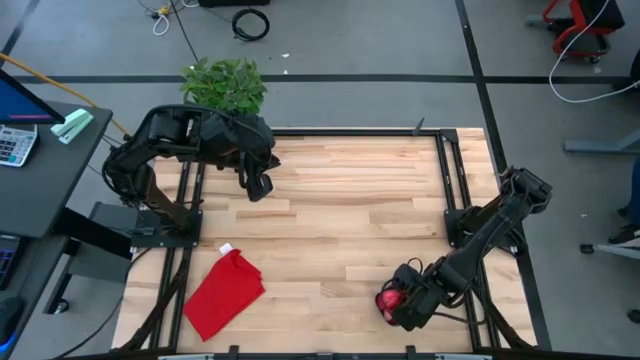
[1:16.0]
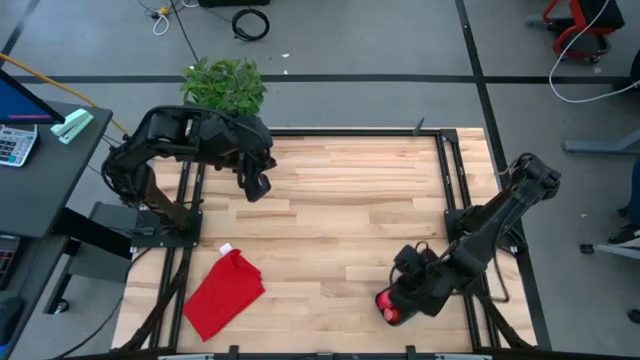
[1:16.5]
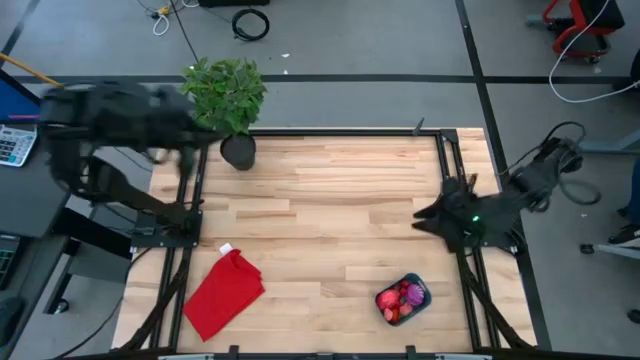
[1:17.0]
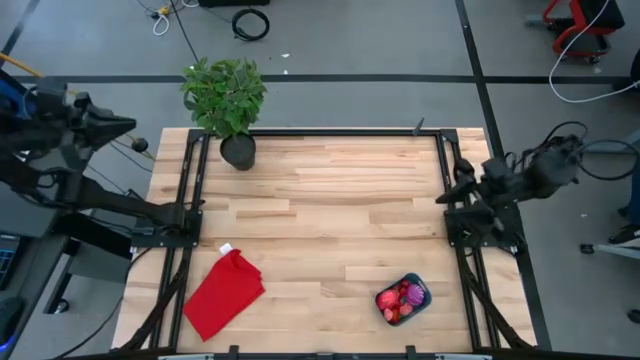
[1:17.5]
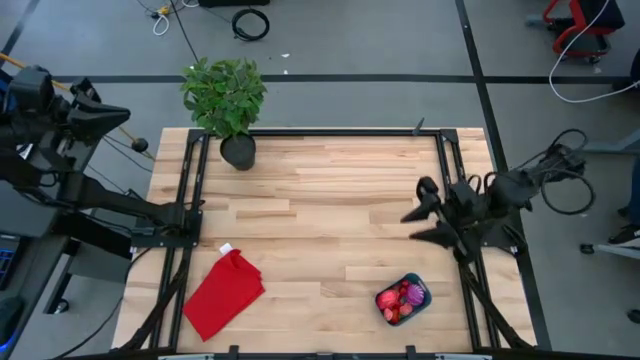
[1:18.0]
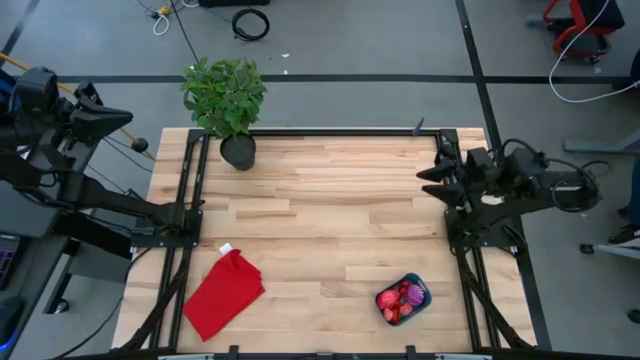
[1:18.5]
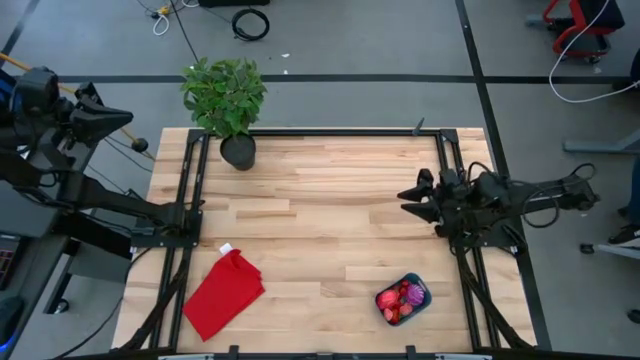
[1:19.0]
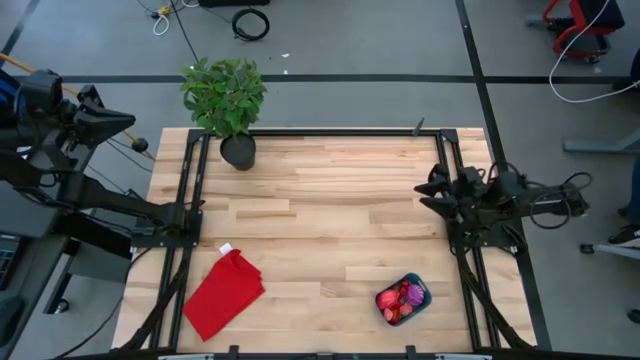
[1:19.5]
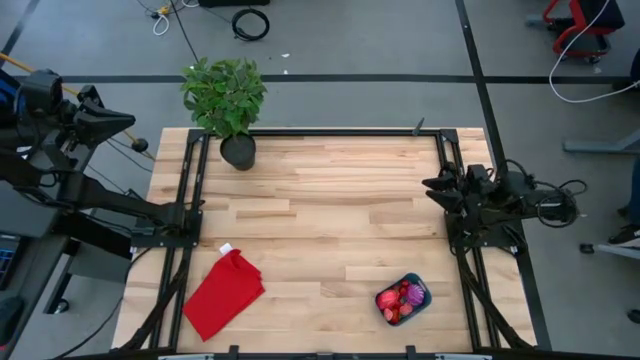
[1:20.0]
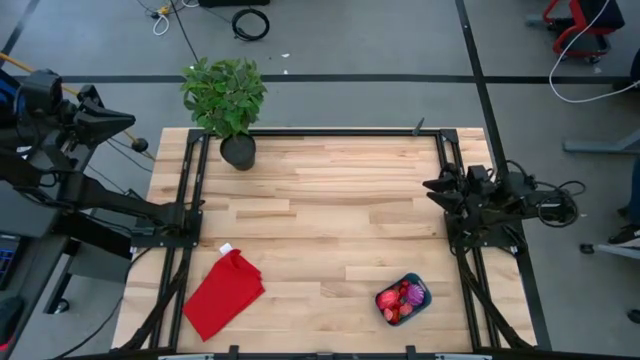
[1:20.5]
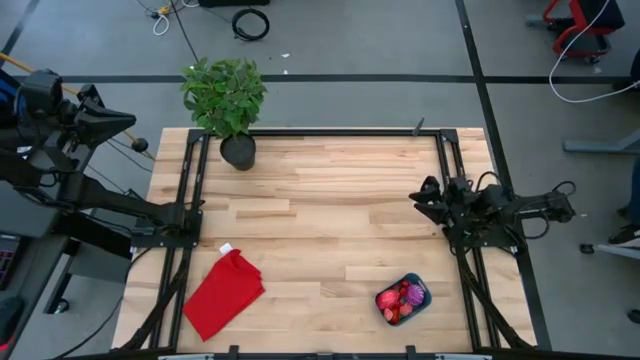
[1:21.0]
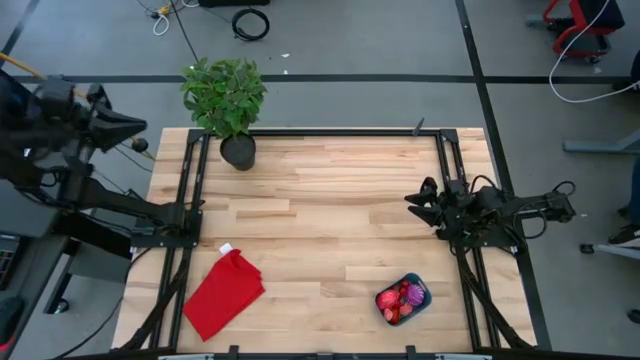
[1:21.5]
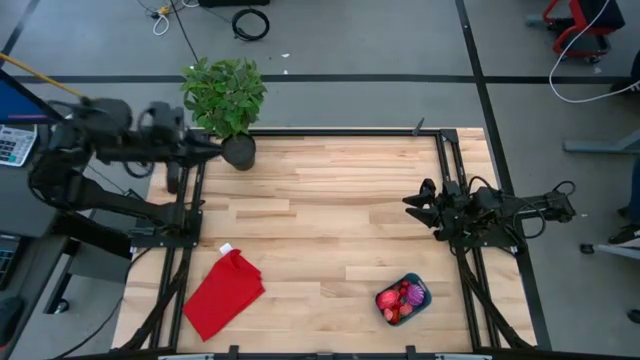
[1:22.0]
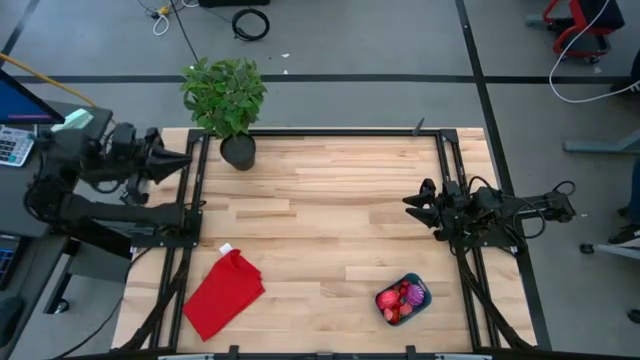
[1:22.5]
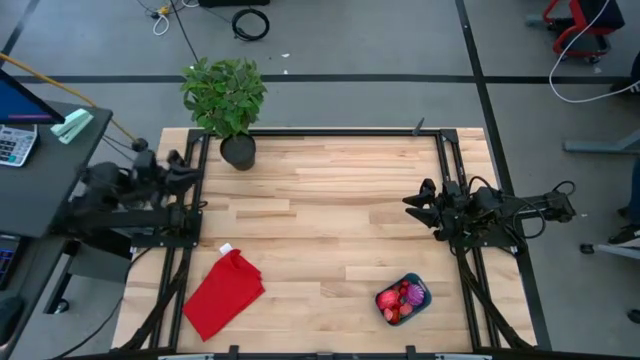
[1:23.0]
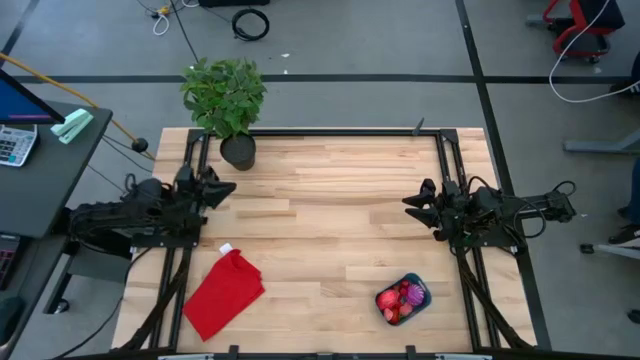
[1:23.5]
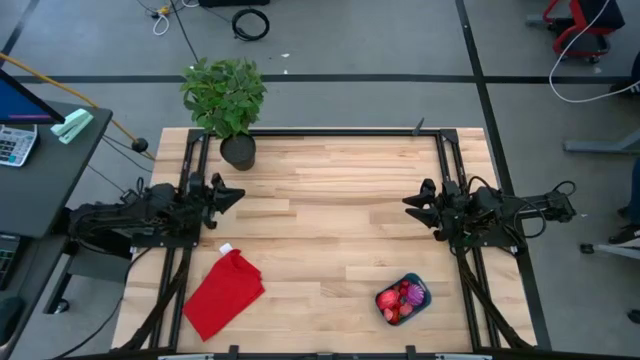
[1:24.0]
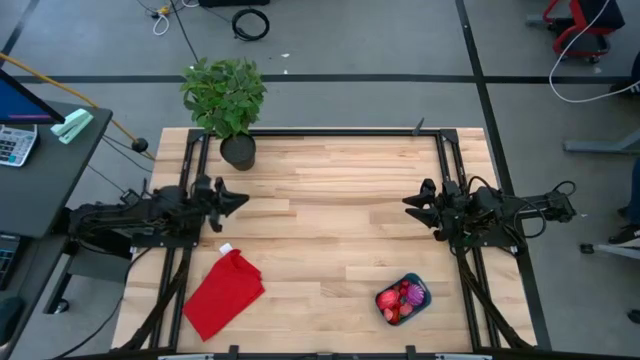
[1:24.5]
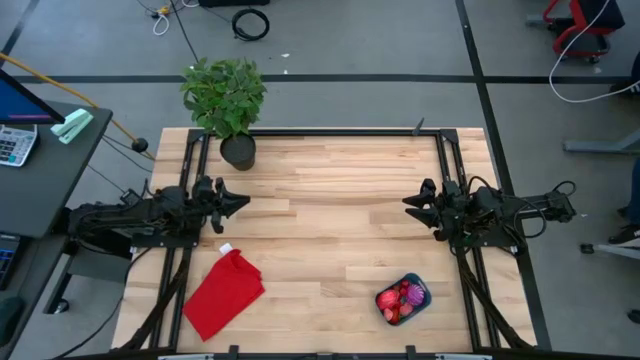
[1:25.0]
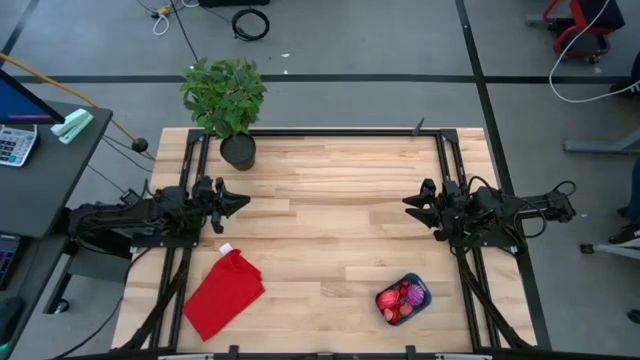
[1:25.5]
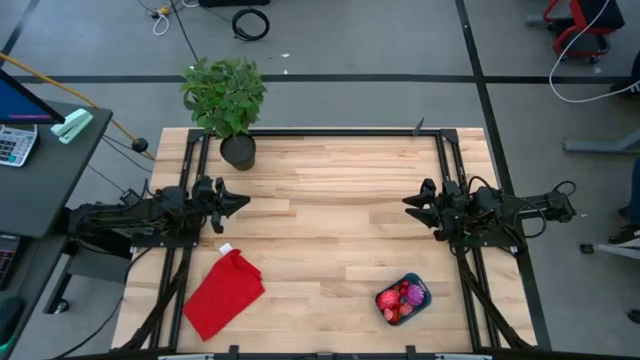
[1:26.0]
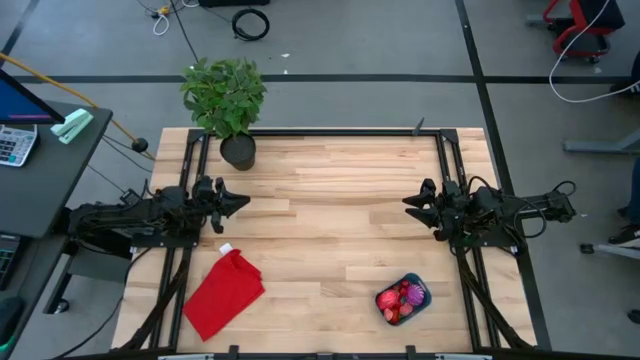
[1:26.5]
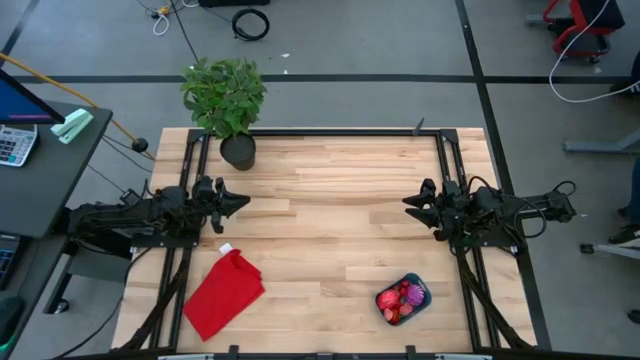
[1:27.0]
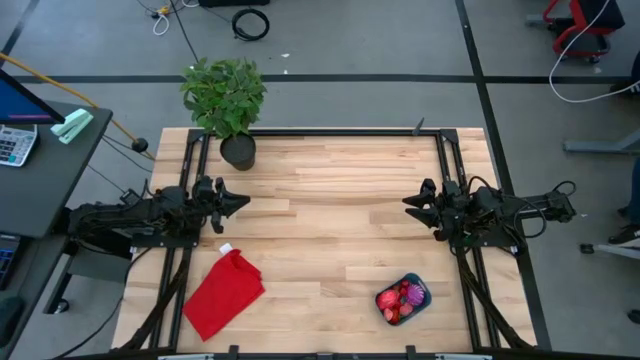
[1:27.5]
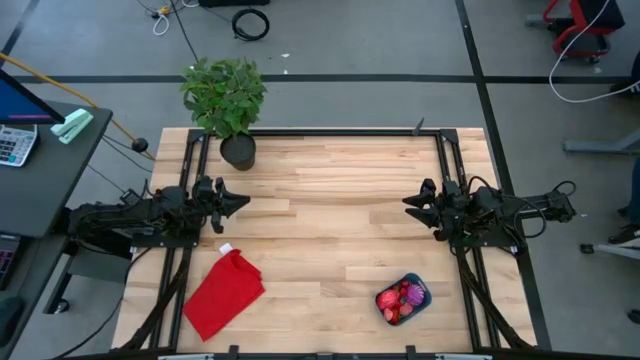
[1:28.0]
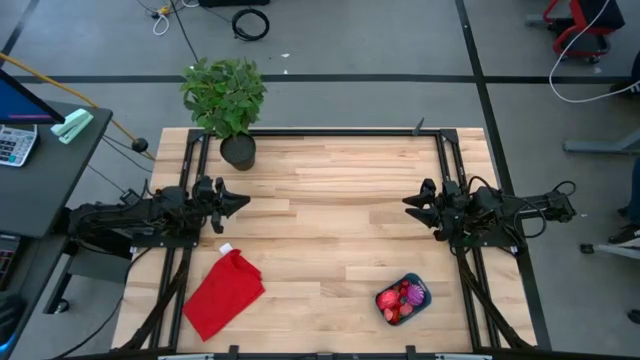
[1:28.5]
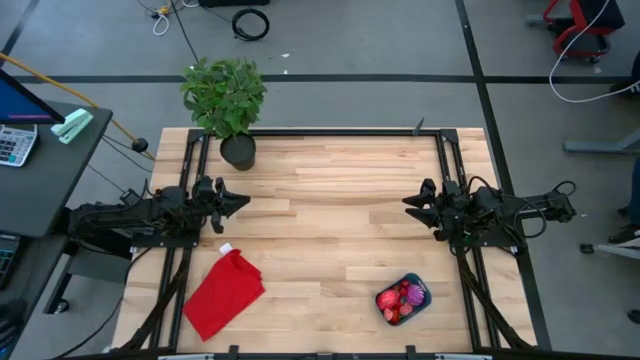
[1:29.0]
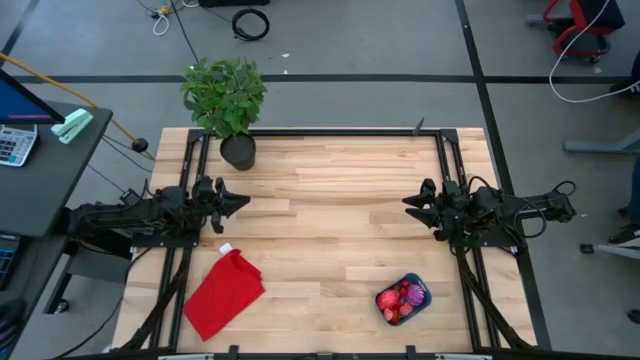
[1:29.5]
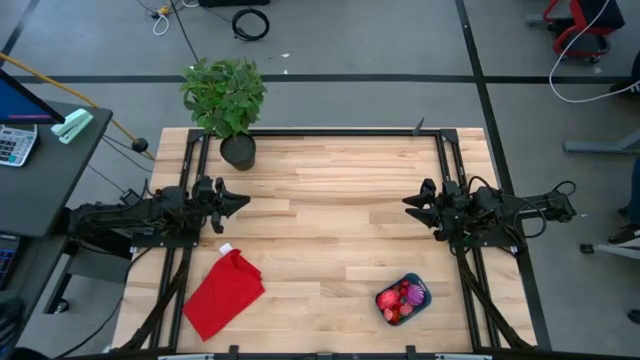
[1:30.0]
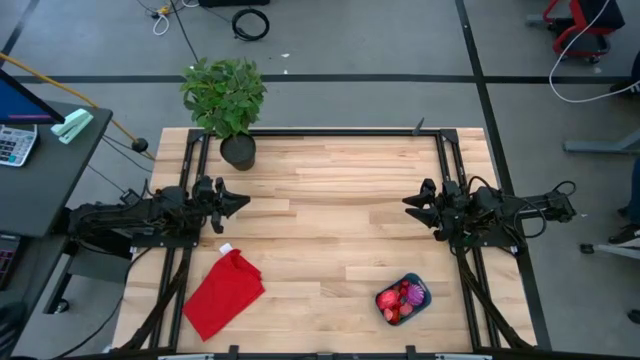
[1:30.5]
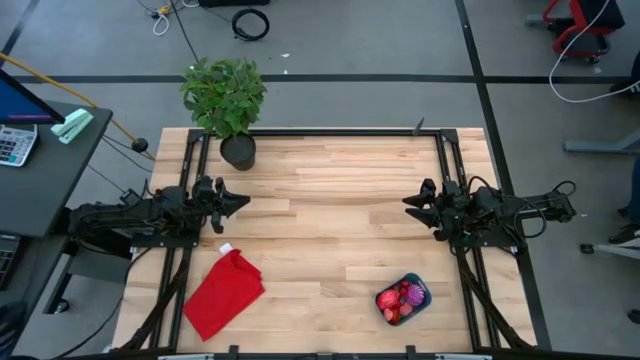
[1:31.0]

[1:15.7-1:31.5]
Task: Pick and placing Produce into tupperware
Return to Home Position

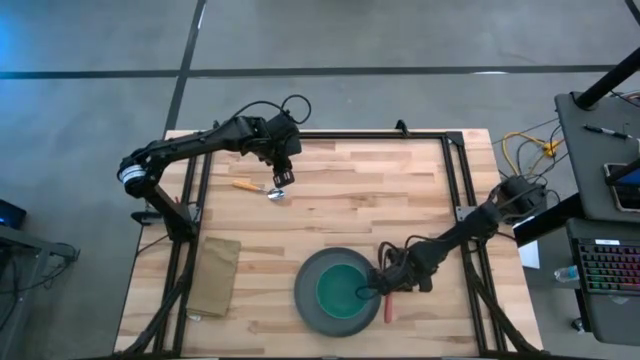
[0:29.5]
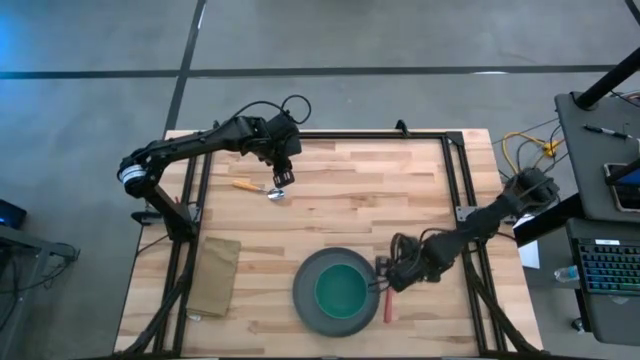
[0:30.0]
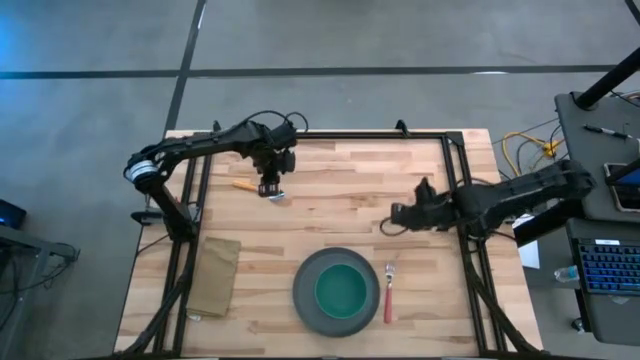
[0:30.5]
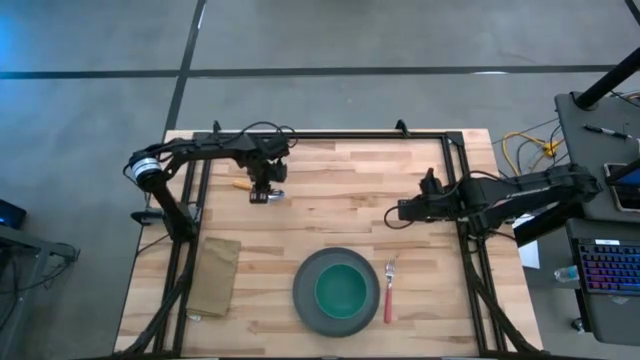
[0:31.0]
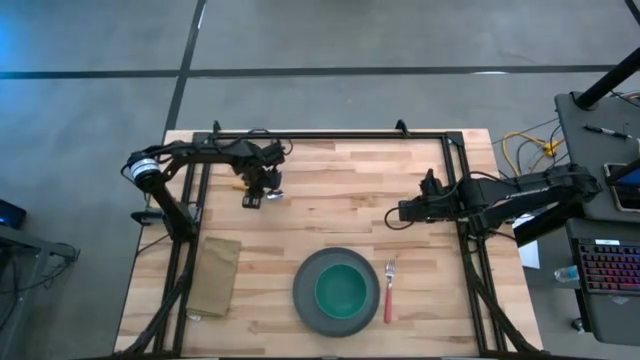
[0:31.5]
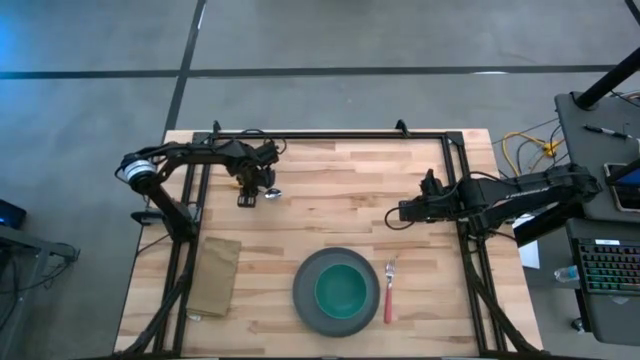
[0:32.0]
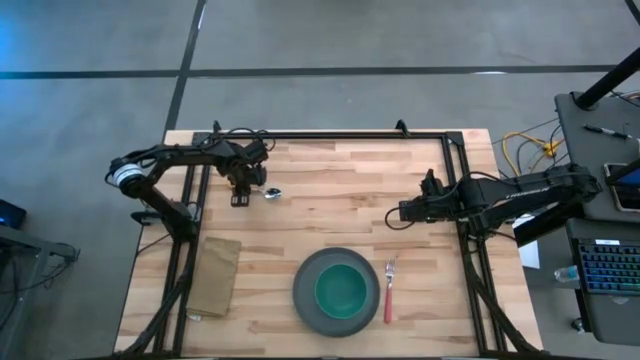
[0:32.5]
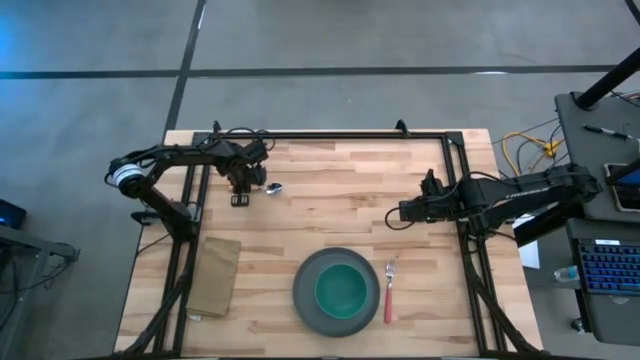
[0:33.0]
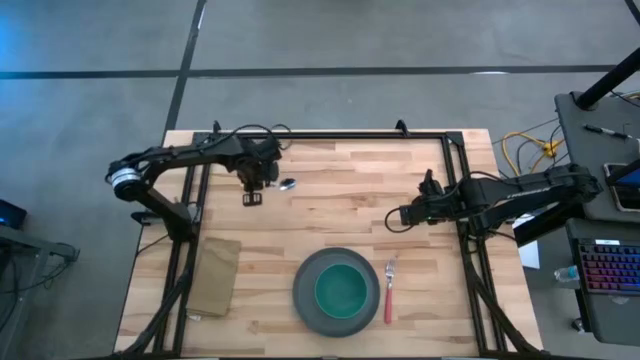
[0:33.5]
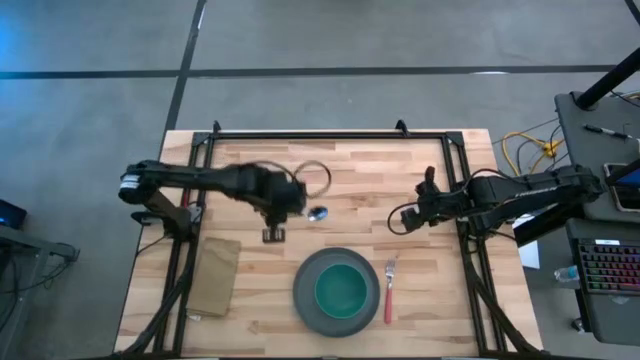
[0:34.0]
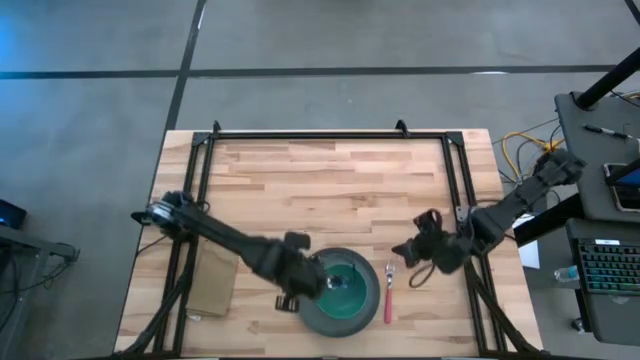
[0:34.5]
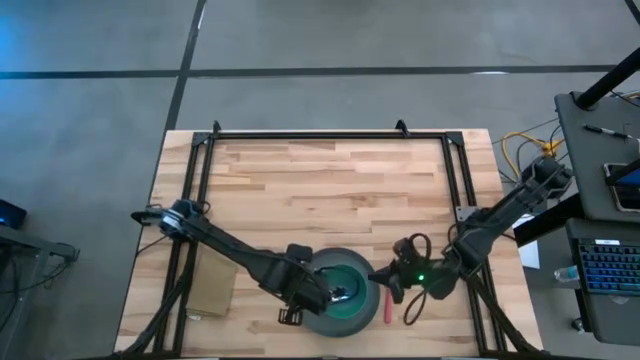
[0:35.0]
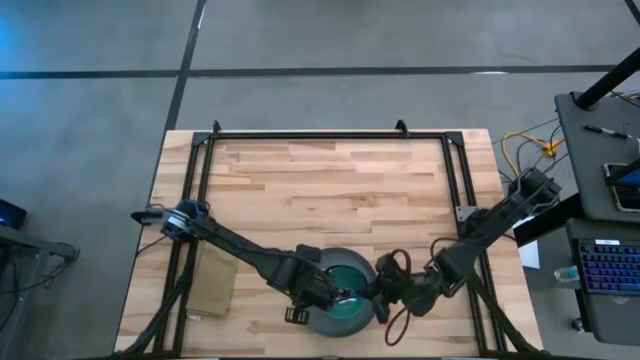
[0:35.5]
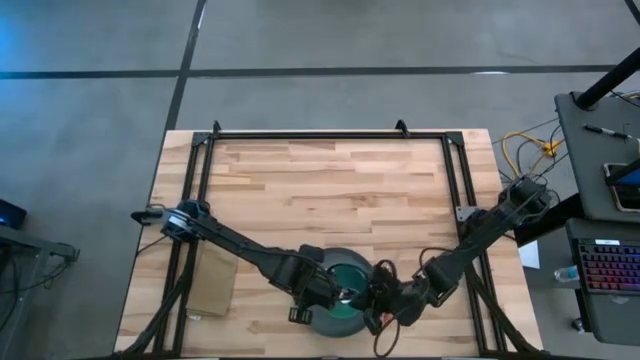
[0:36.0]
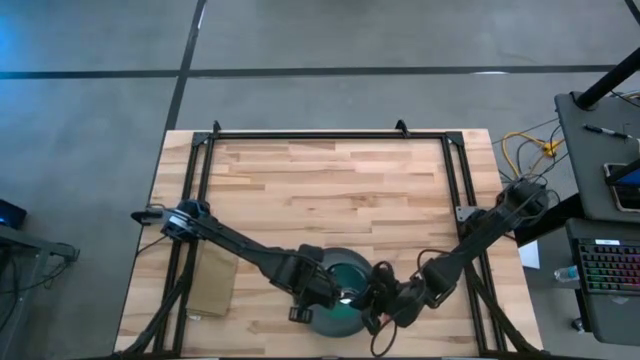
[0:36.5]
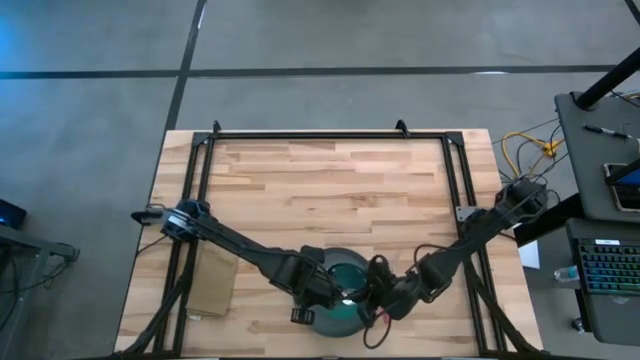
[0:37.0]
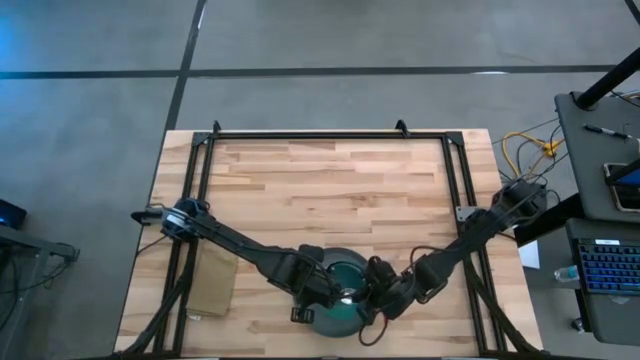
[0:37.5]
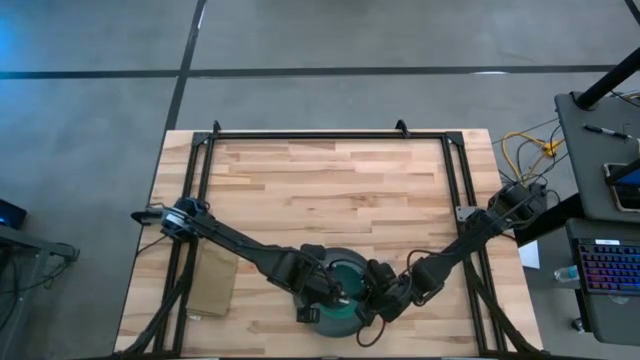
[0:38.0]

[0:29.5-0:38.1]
Task: Set table place
Put the spoon into the bowl
